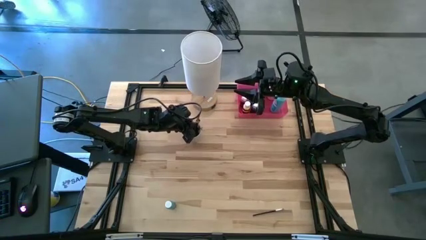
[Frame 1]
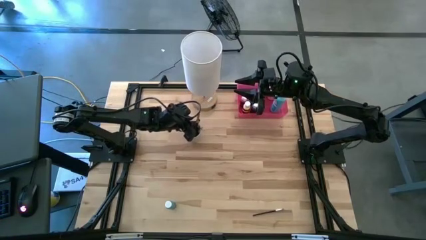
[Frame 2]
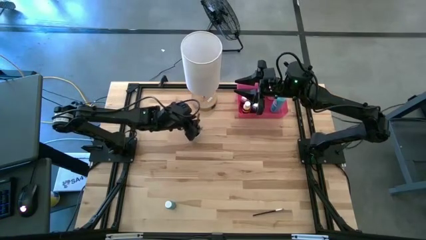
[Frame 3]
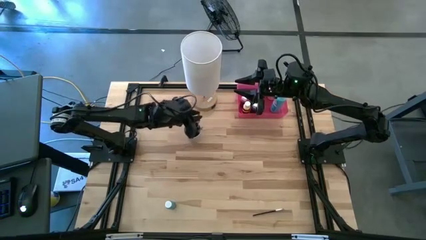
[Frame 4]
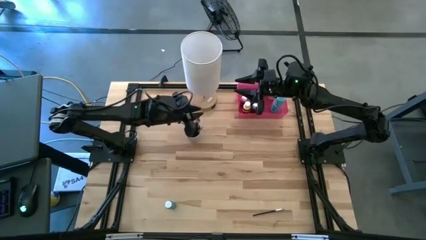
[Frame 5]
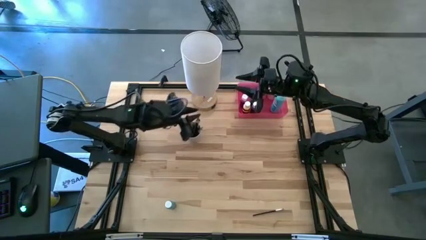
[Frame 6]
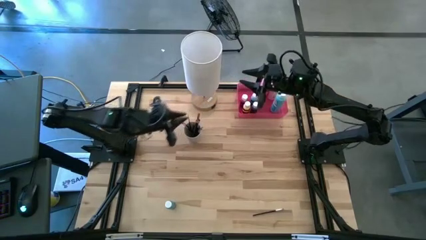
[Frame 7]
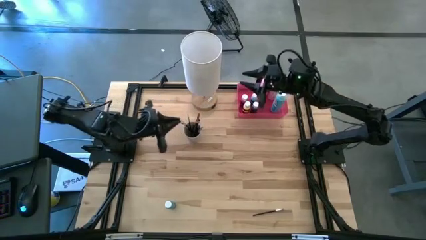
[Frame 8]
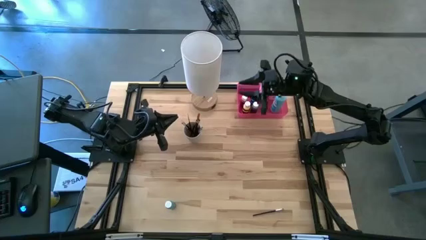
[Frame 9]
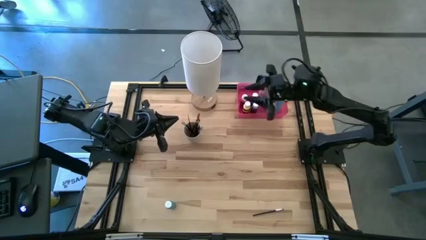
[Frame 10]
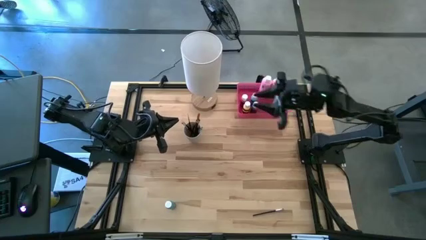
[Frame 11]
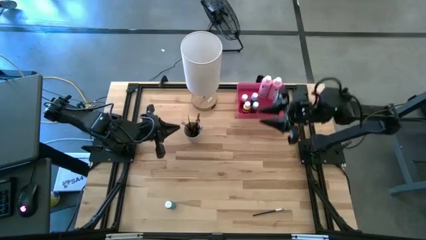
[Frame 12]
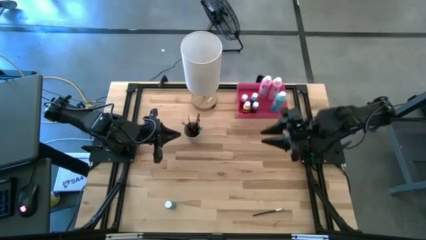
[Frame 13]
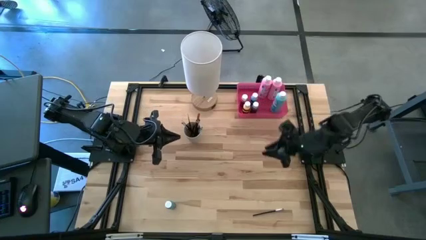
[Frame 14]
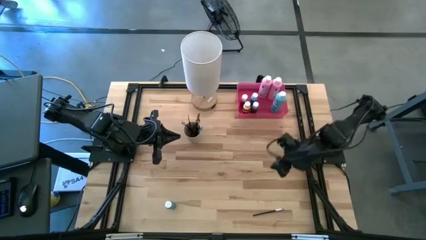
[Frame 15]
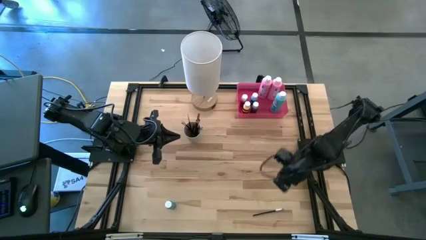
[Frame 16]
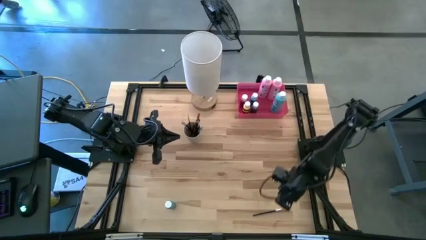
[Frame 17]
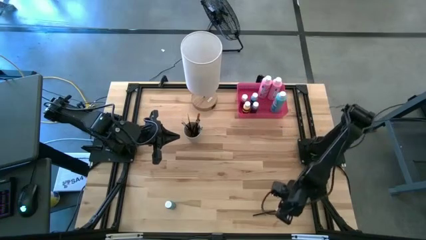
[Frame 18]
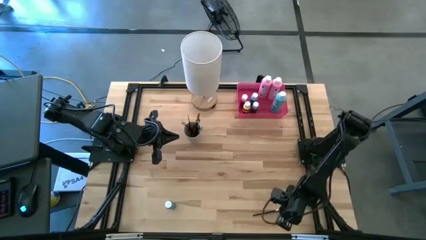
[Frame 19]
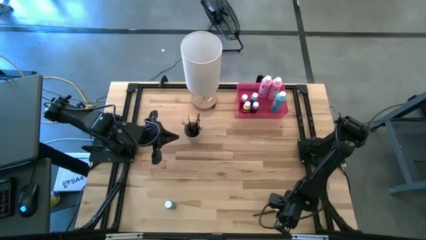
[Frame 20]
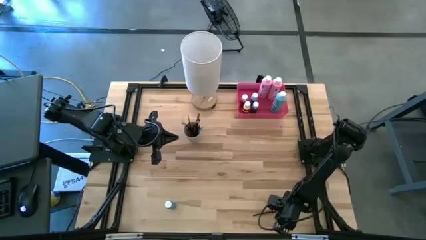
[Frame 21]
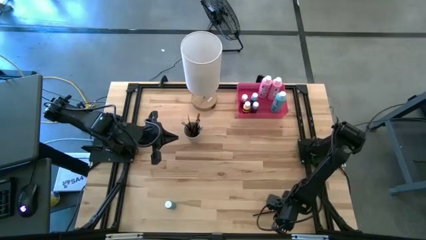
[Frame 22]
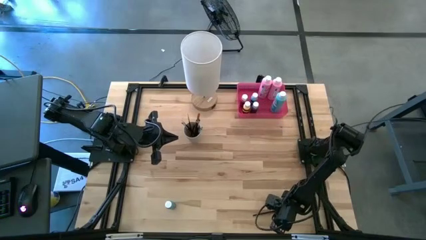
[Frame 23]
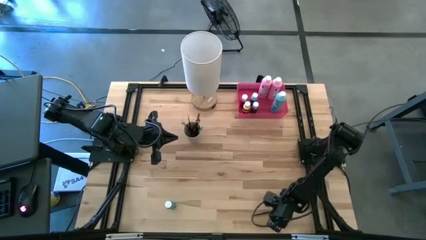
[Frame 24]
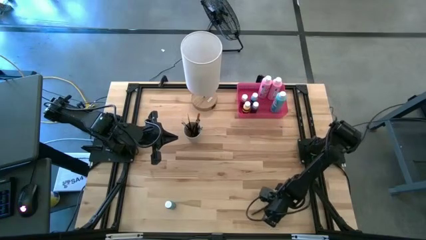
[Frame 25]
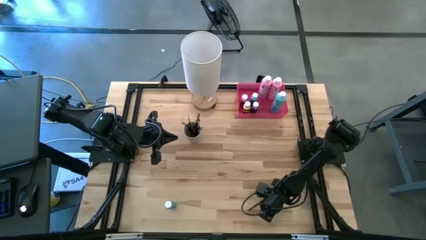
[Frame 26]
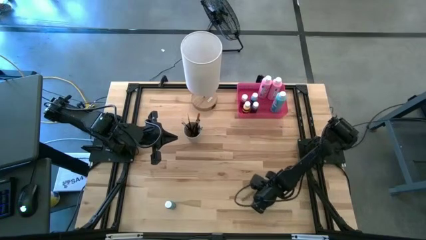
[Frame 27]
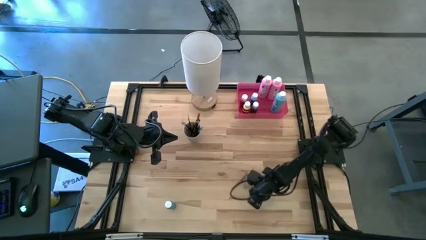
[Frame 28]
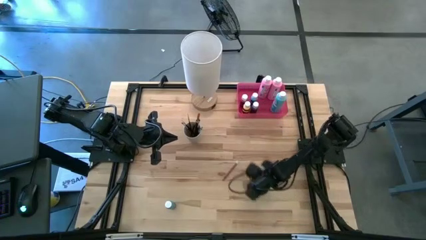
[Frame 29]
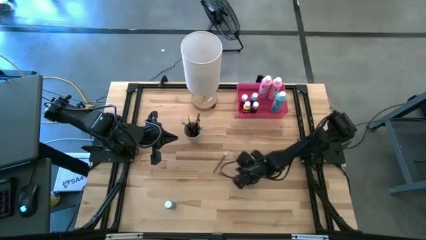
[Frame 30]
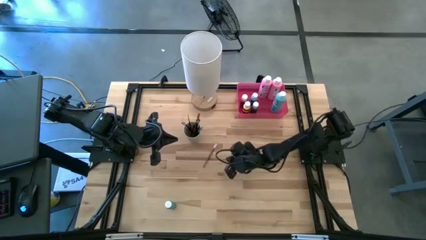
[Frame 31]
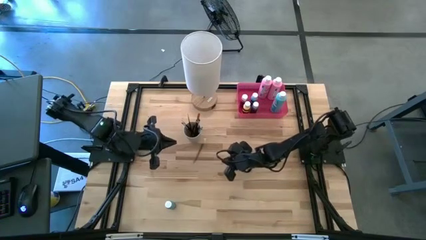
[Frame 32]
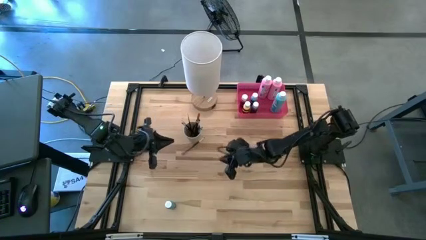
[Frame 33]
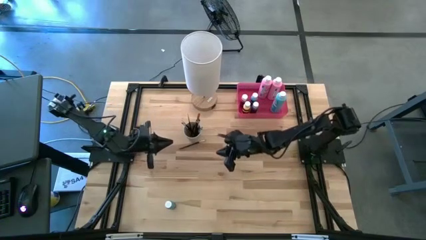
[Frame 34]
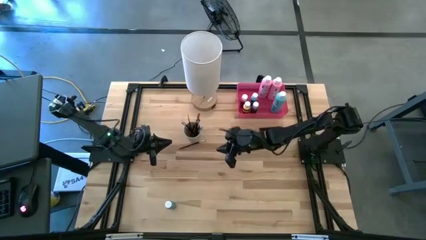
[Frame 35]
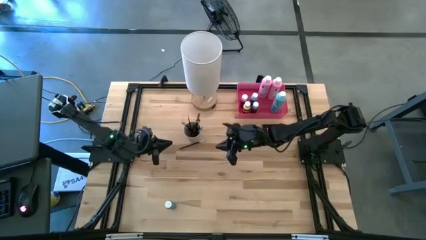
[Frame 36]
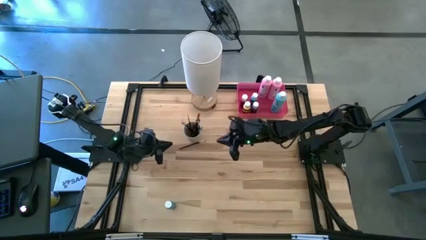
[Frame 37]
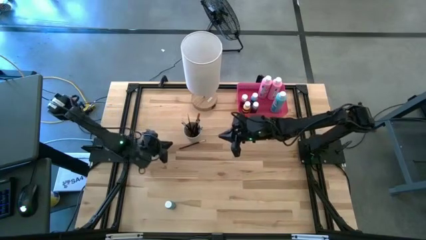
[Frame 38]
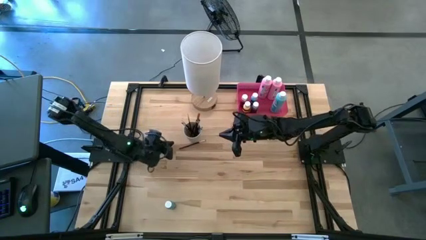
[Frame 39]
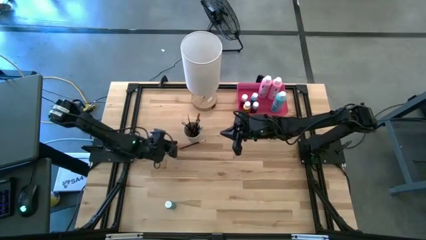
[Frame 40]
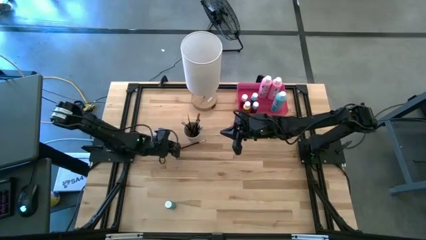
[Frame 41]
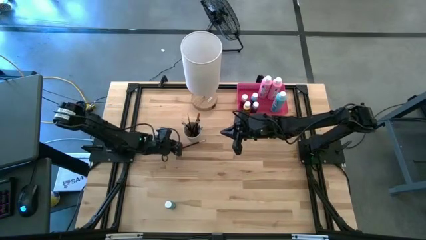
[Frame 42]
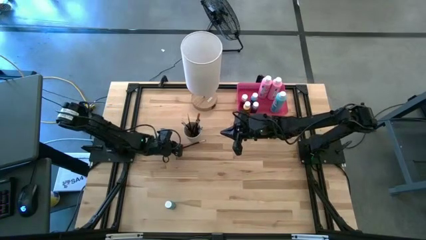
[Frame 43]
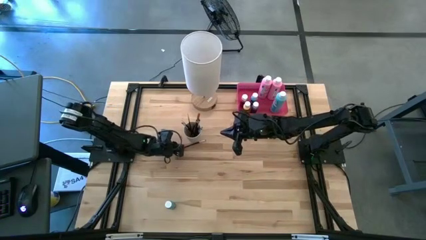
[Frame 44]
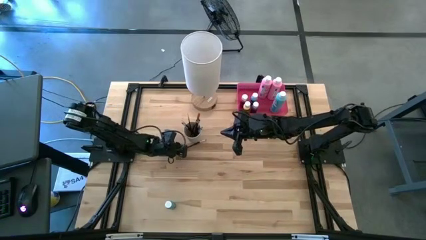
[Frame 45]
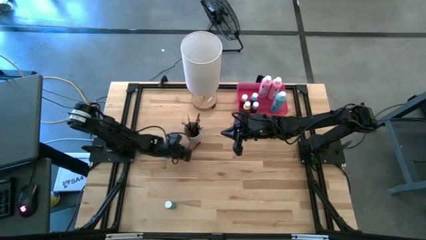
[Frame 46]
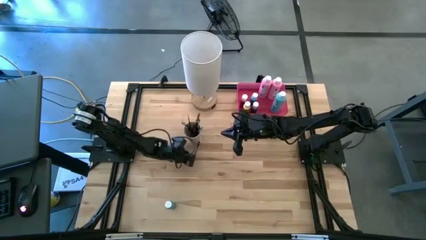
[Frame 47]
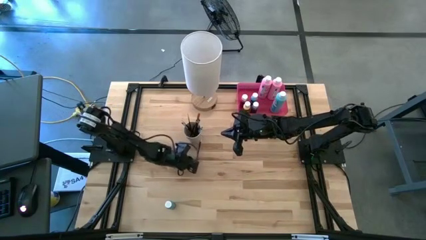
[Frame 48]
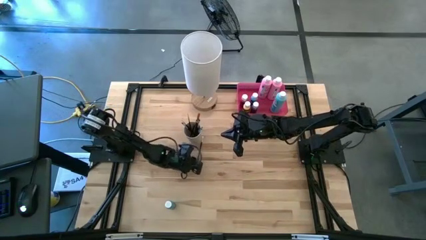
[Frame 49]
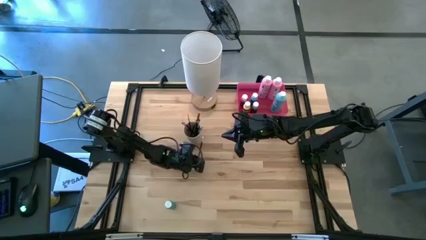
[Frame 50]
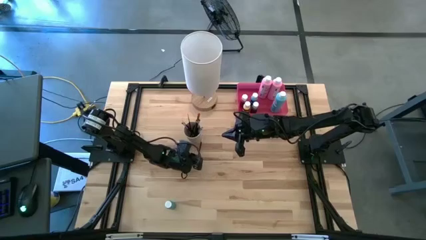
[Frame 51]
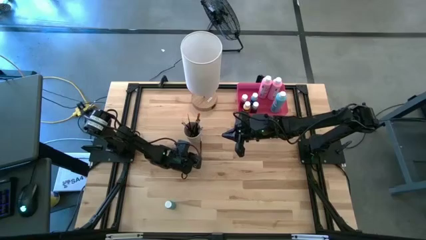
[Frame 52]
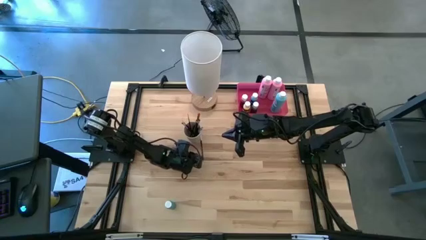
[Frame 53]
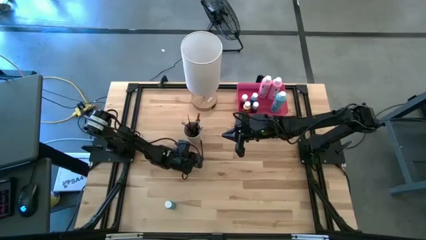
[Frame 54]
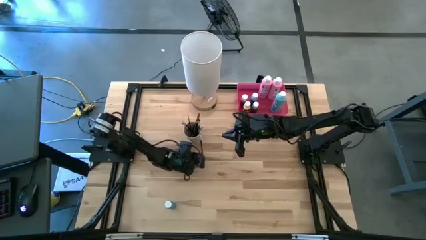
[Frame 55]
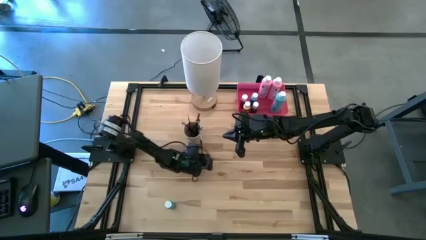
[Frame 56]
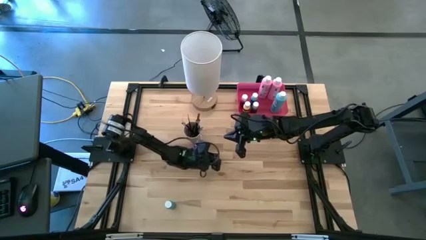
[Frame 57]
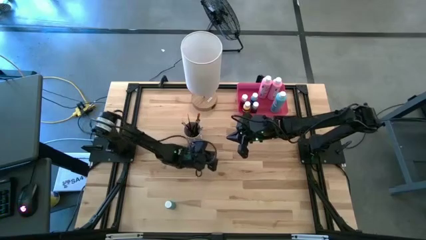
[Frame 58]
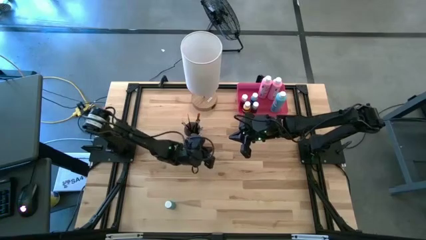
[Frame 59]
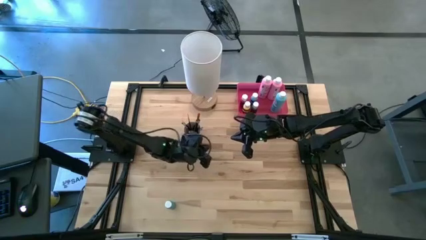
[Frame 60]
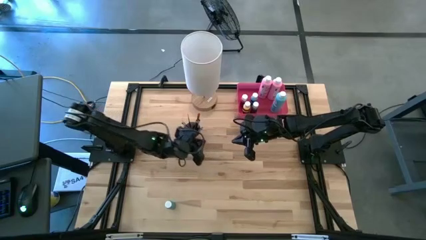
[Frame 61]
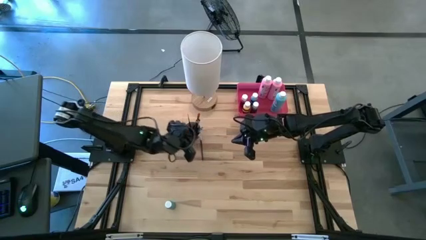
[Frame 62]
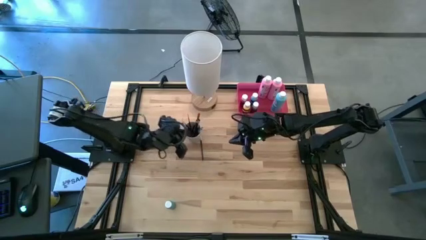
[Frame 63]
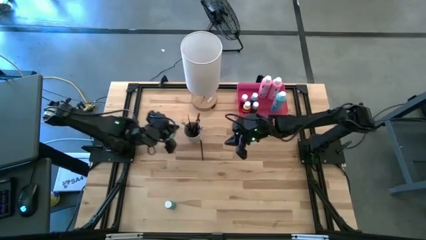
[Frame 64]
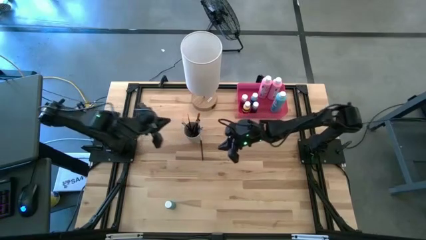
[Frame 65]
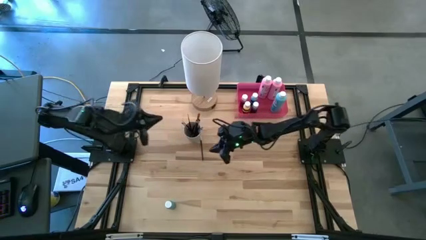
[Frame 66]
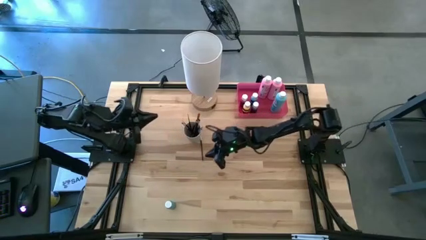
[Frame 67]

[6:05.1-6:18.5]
Task: Pick & Place Paint Supplies
Put the silver eyeshadow brush into the white cup
